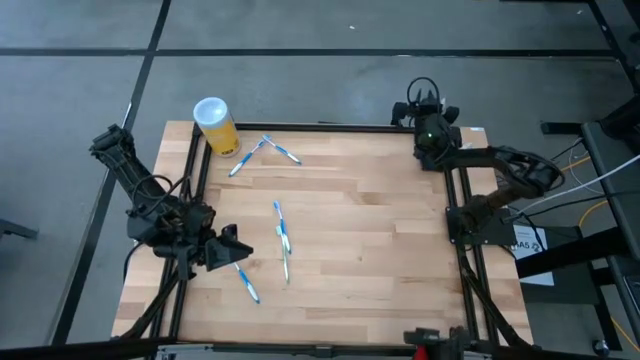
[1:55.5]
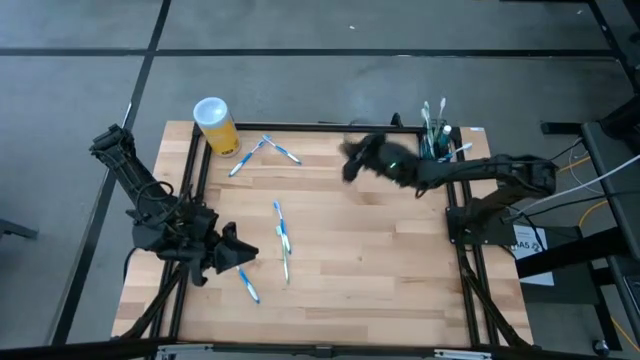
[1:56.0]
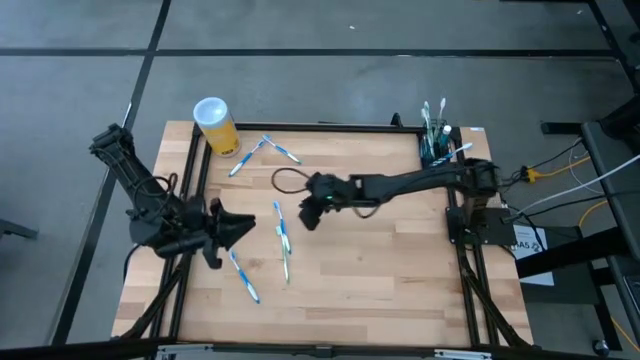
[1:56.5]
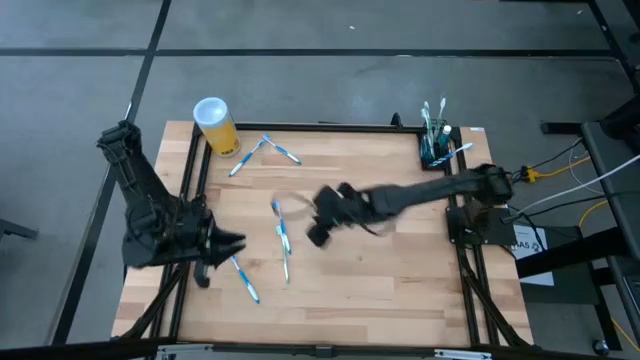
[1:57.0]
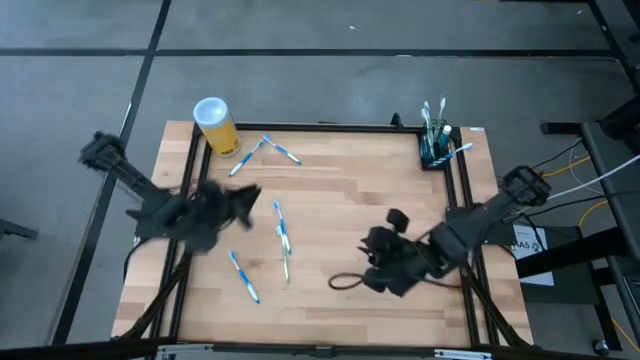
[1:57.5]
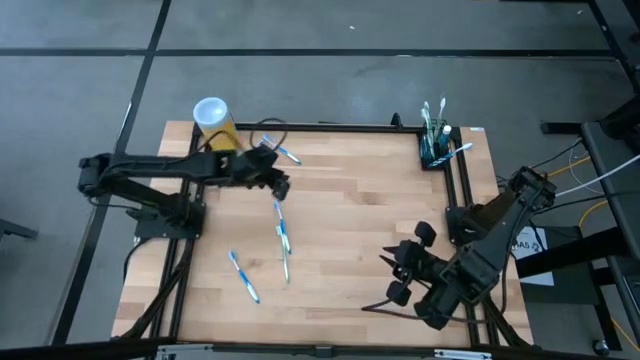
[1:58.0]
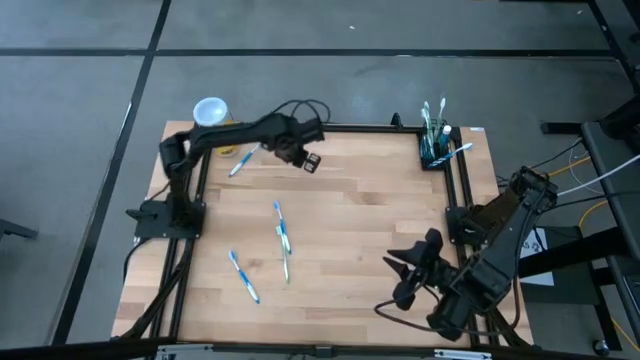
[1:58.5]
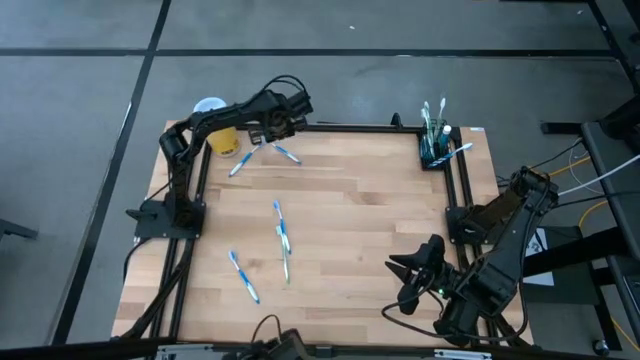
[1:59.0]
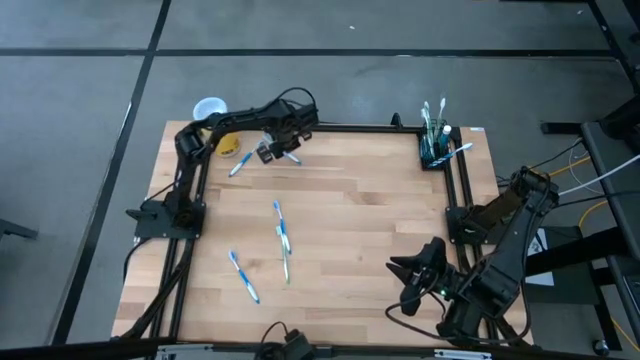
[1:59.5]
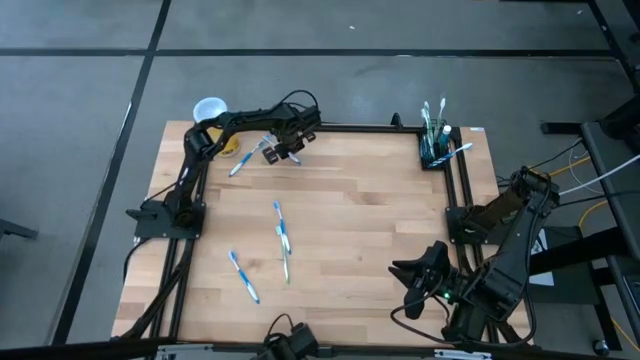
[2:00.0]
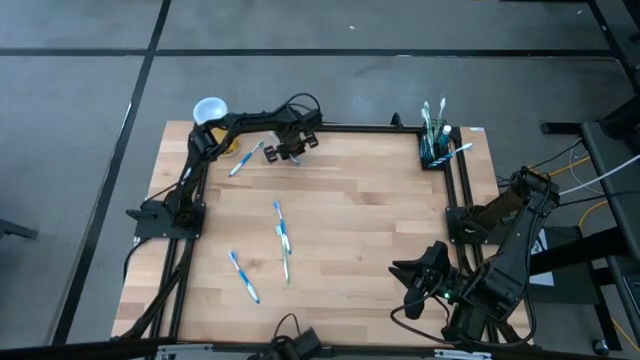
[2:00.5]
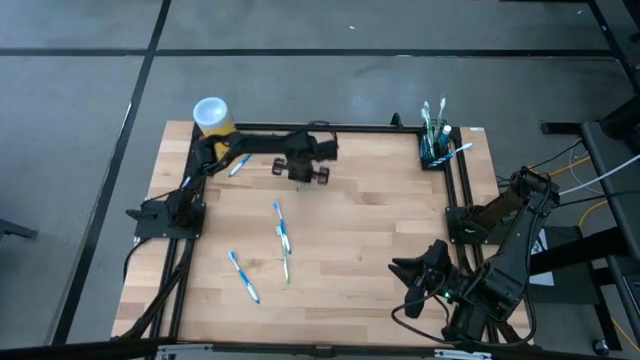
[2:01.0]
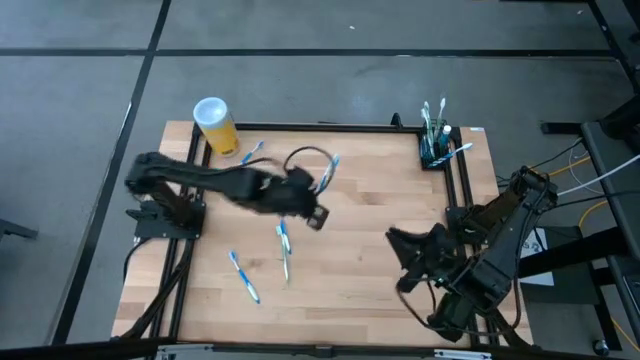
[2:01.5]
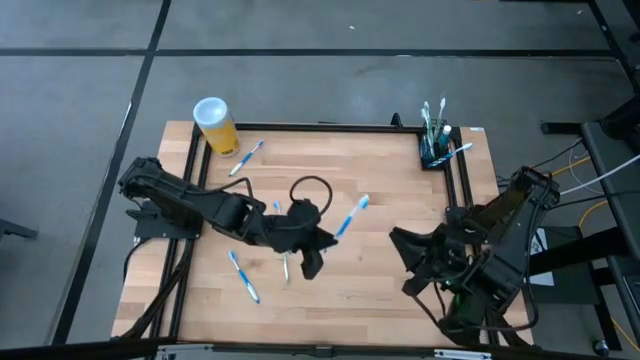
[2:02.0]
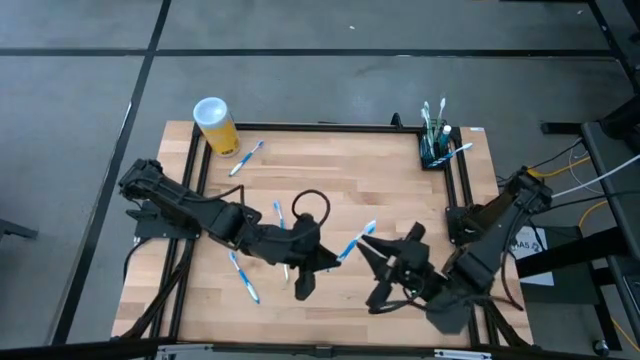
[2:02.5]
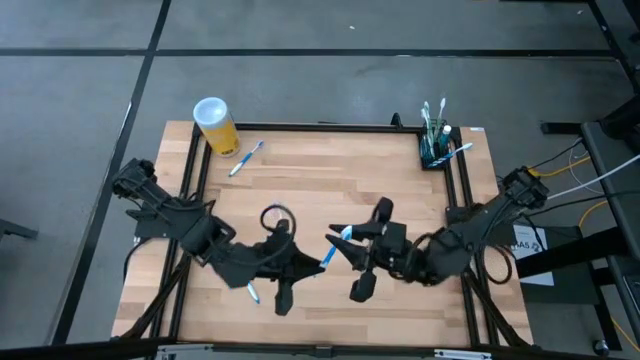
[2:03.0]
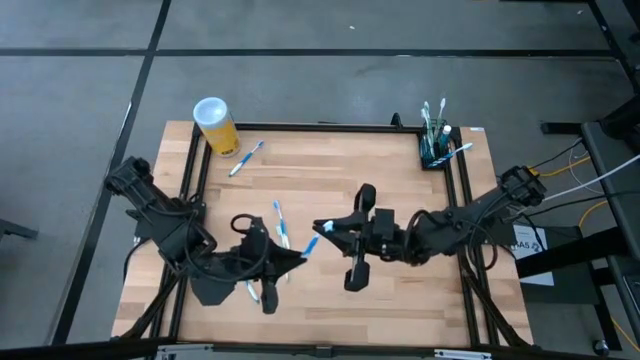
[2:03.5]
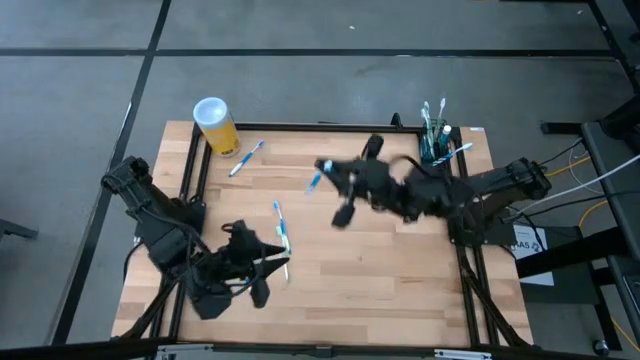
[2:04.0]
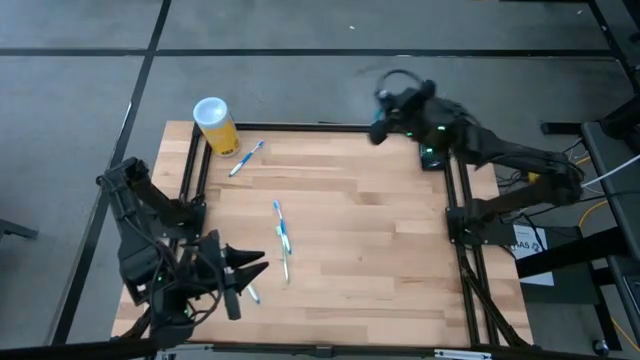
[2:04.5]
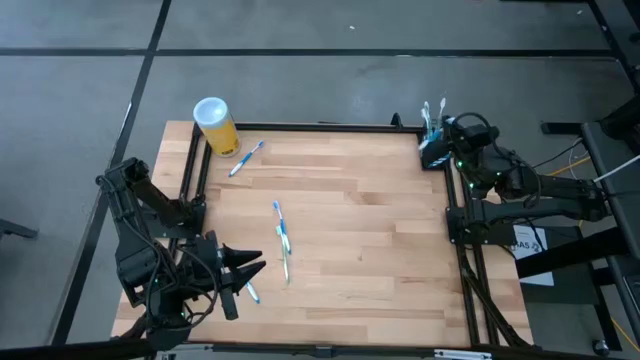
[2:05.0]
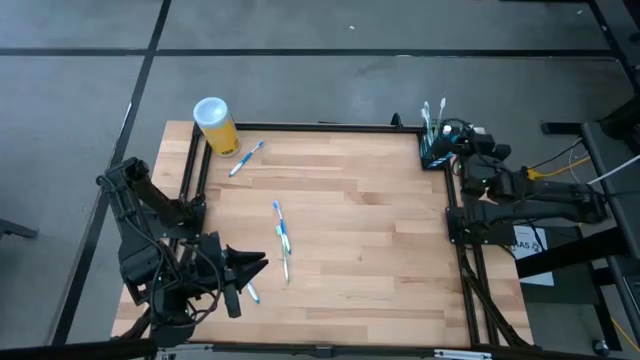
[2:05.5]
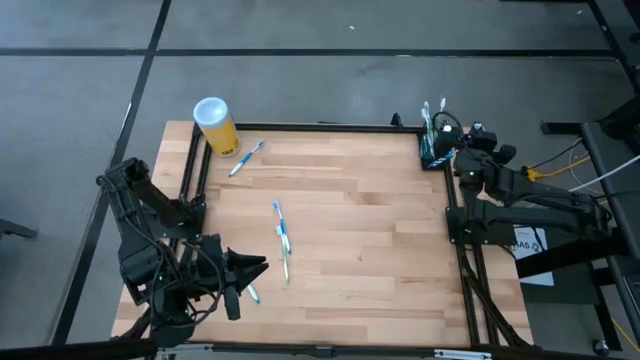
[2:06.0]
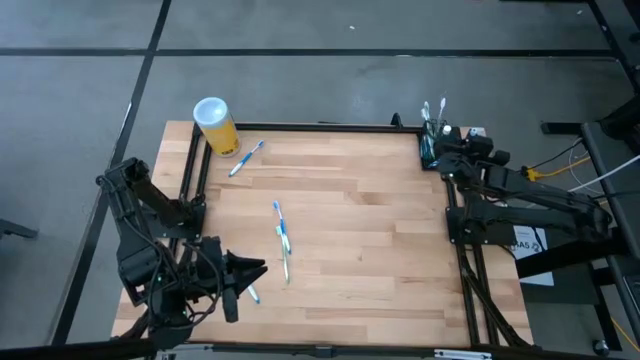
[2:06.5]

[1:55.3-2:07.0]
Task: Pick & Place toothbrushing station
Put the blue toothbrush into the mesh organizer

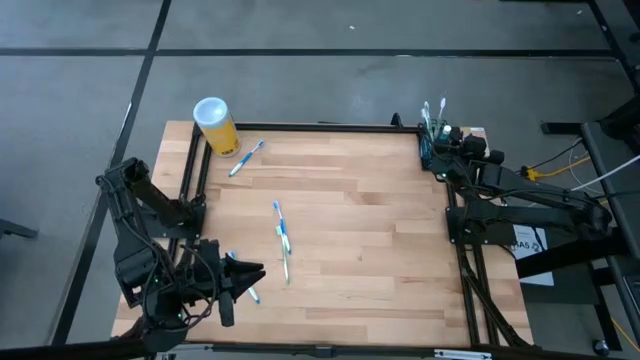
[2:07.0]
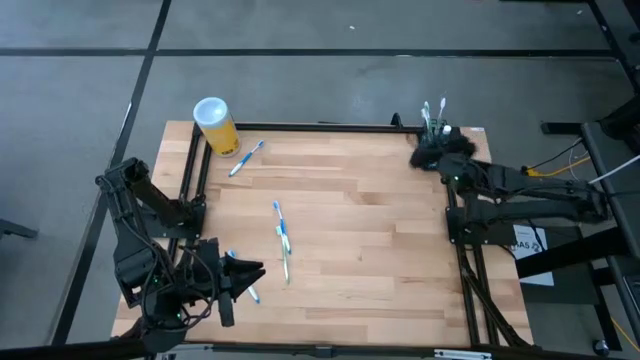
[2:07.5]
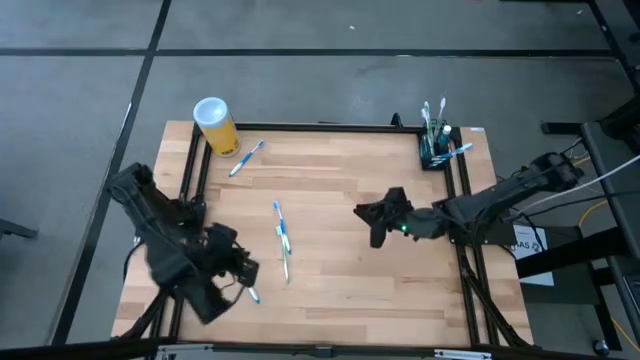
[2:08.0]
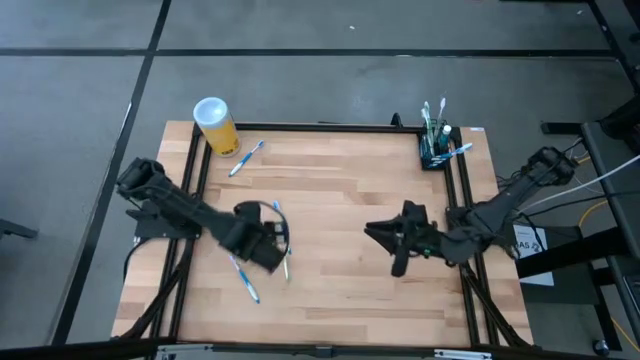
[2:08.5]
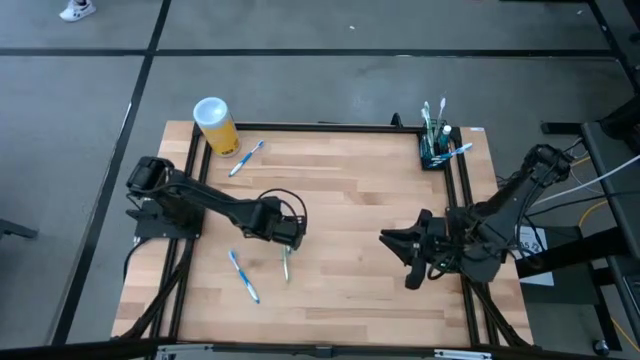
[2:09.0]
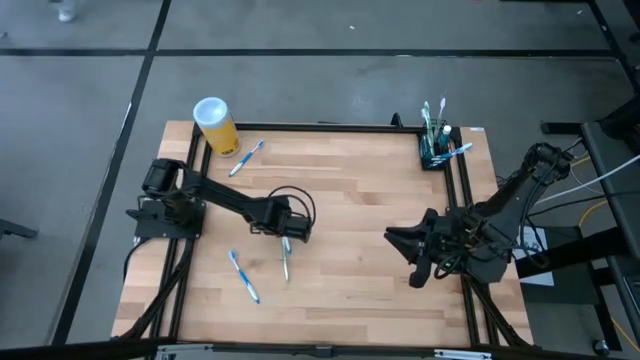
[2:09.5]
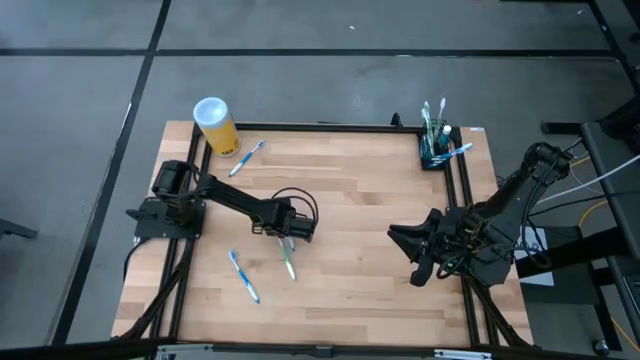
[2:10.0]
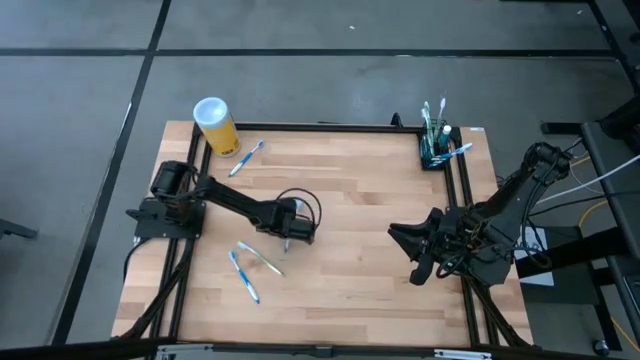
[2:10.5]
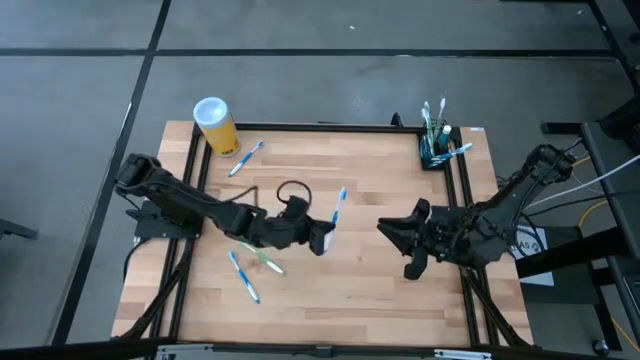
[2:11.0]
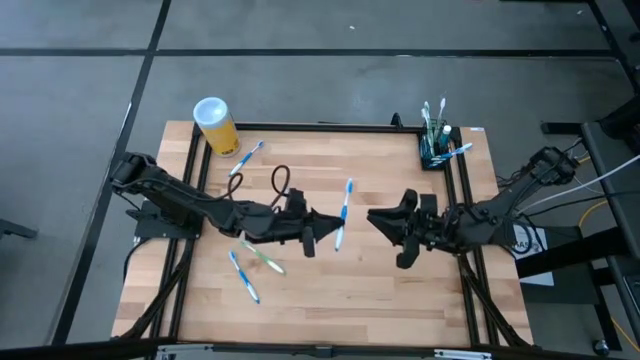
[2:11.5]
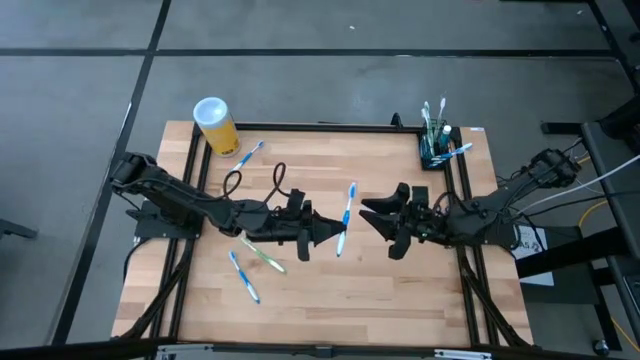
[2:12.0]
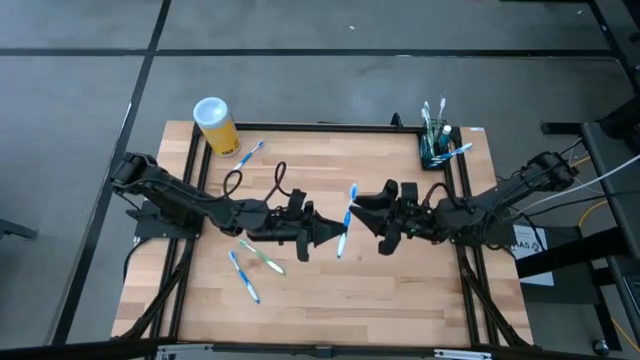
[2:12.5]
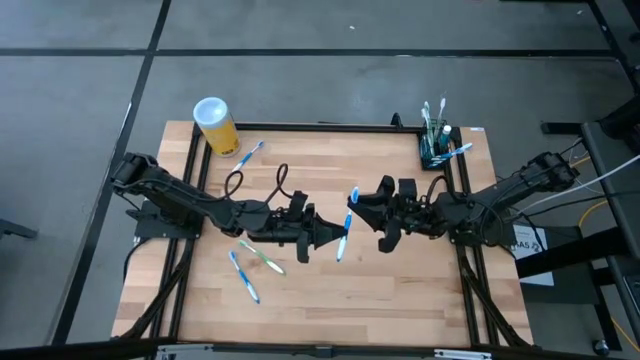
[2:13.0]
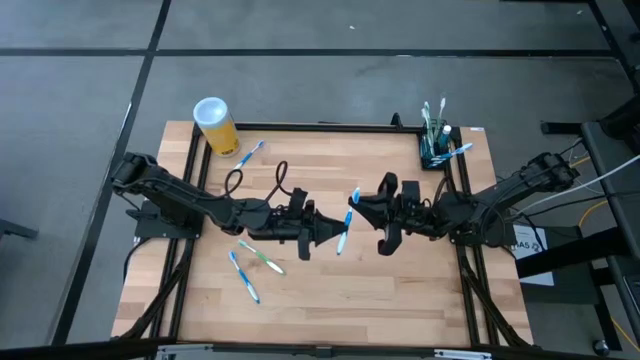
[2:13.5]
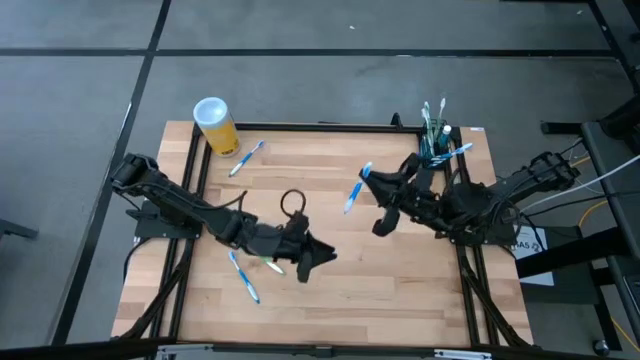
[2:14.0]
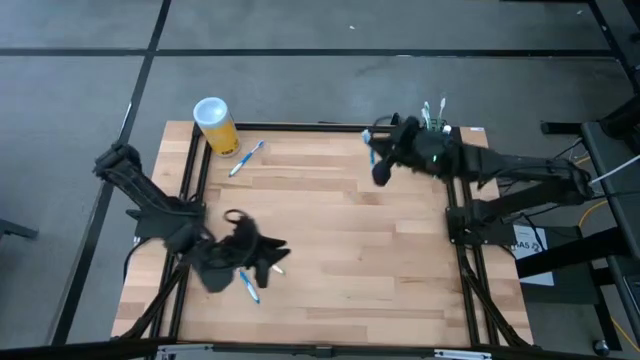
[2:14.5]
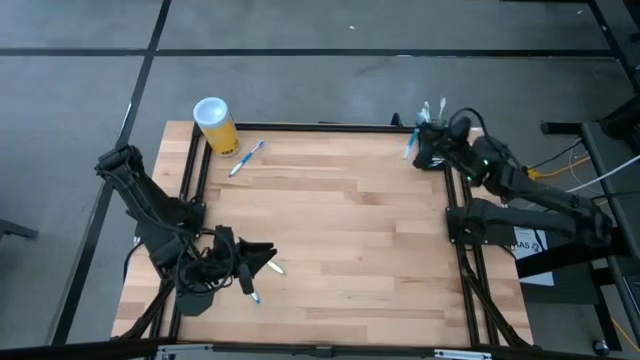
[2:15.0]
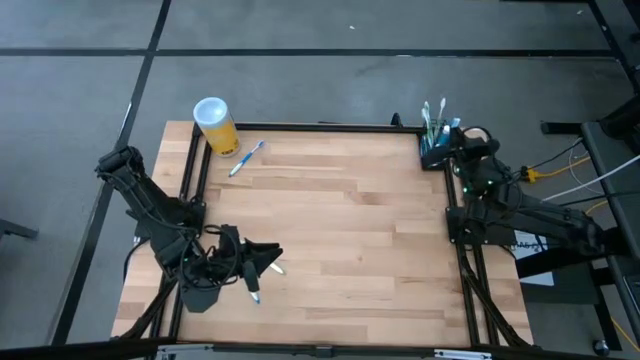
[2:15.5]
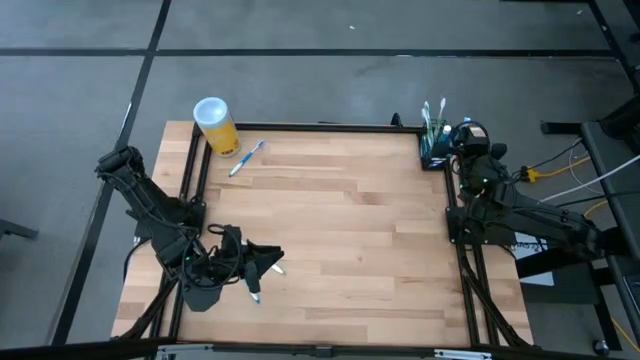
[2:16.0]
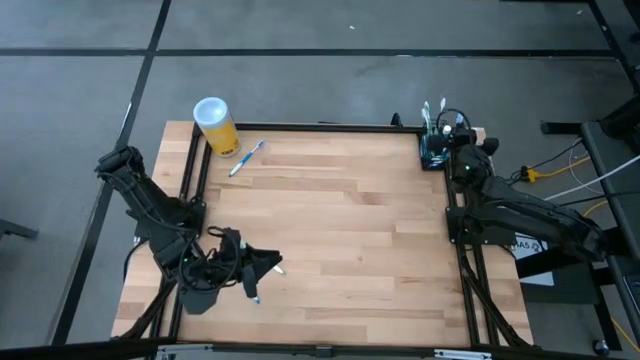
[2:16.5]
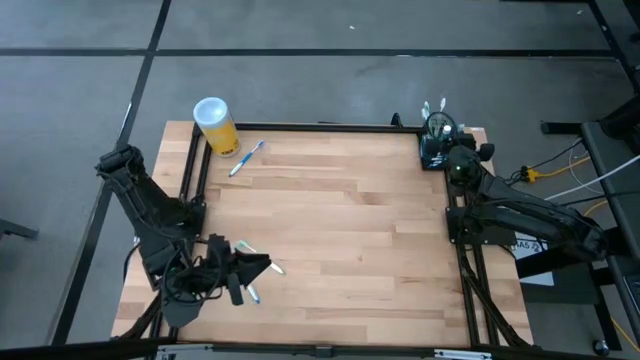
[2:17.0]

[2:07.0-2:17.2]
Put the blue toothbrush into the mesh organizer
